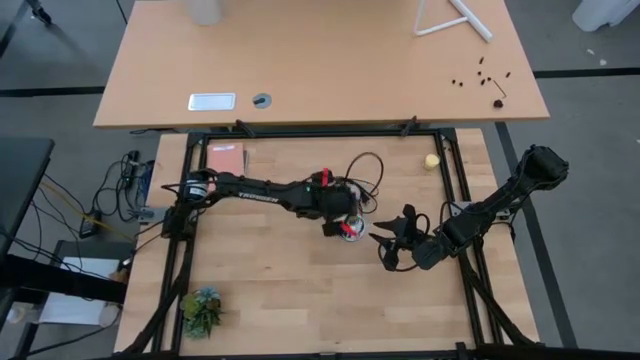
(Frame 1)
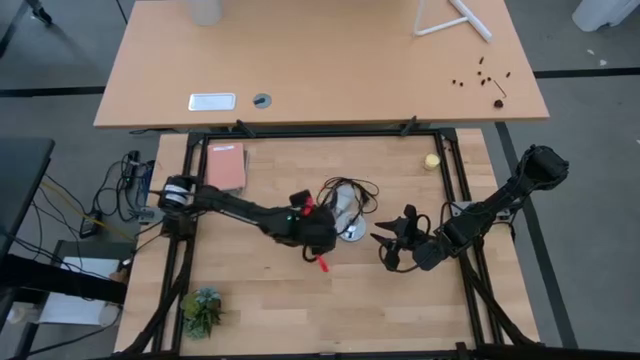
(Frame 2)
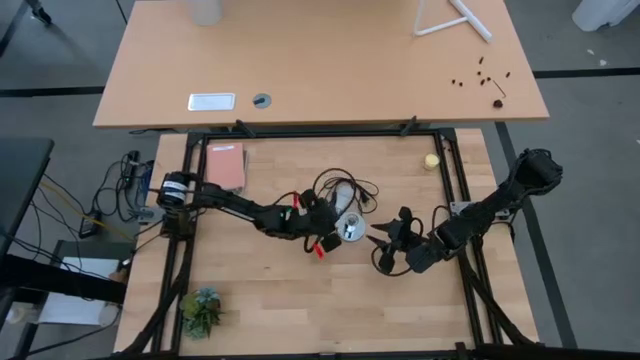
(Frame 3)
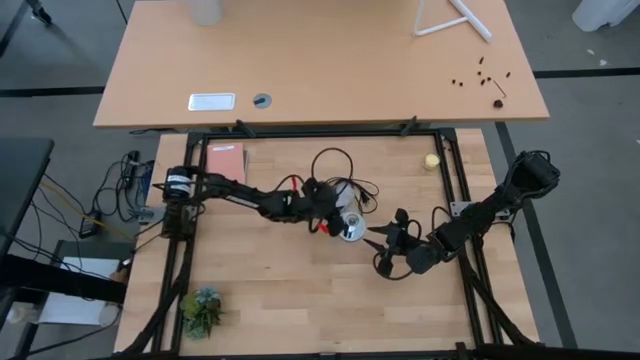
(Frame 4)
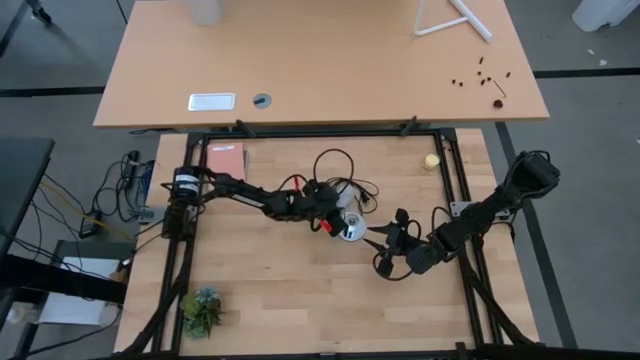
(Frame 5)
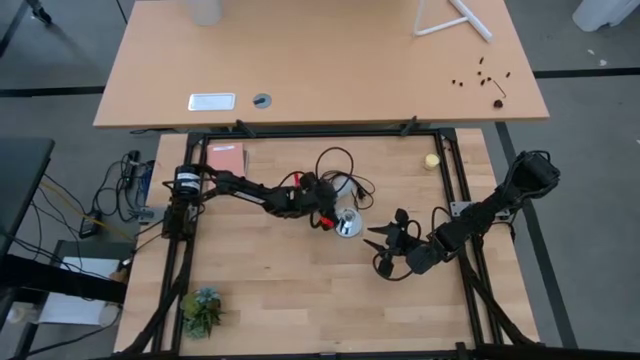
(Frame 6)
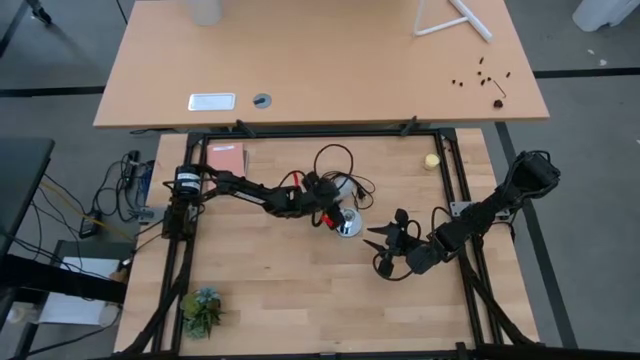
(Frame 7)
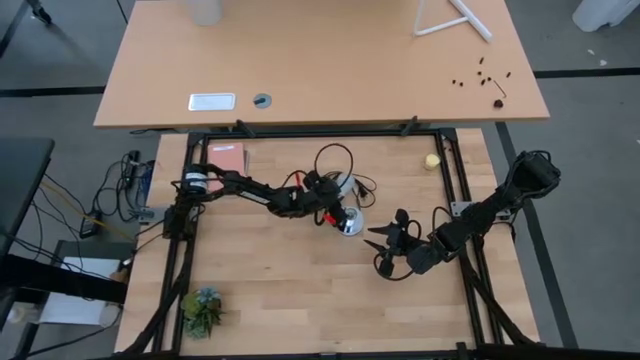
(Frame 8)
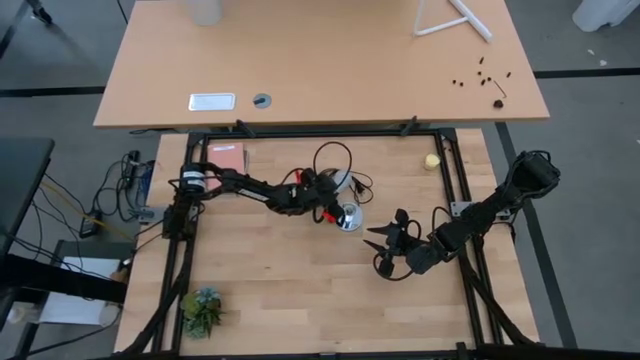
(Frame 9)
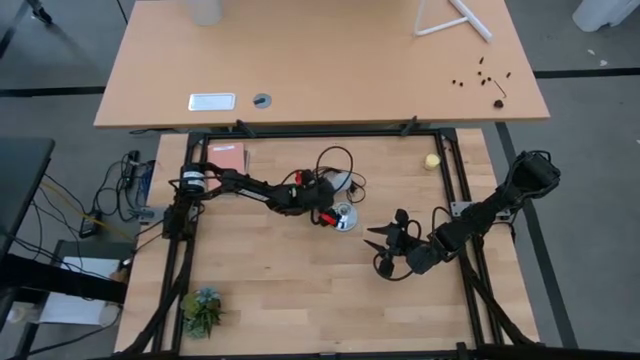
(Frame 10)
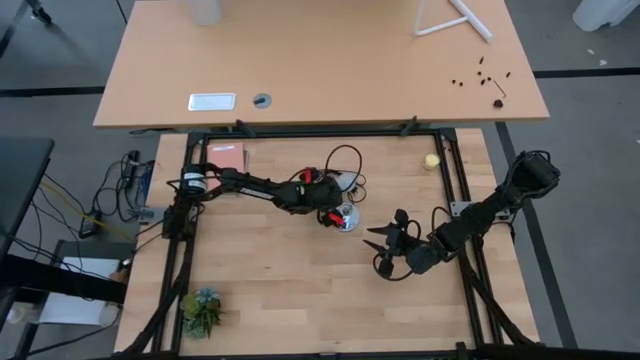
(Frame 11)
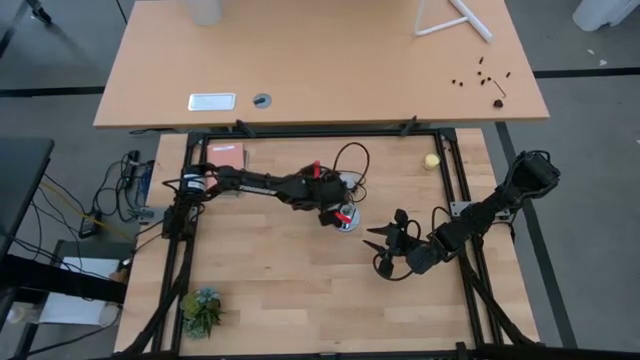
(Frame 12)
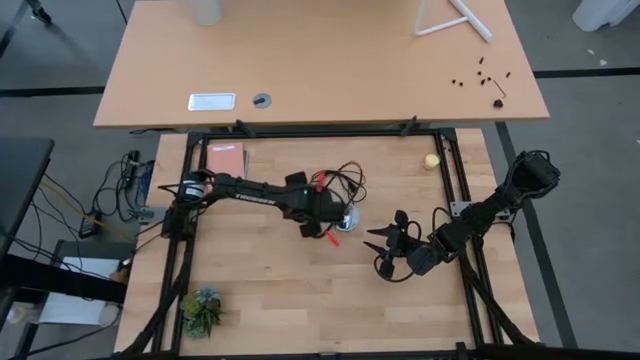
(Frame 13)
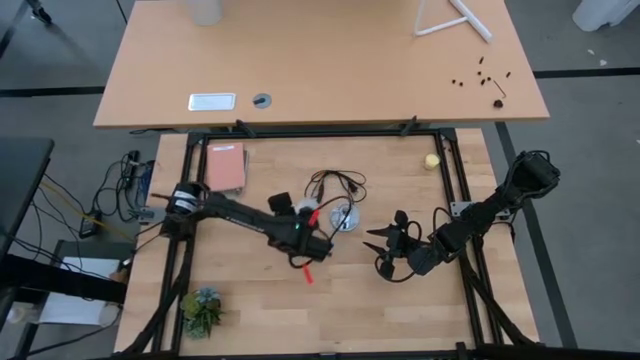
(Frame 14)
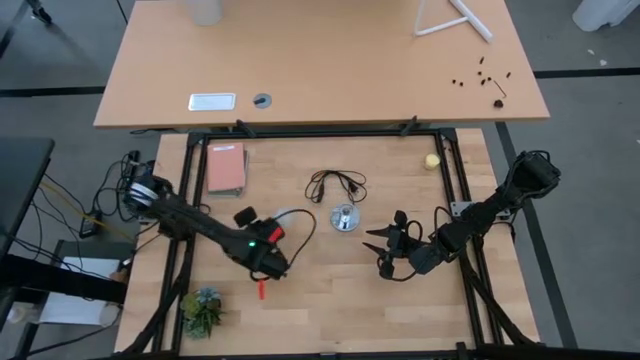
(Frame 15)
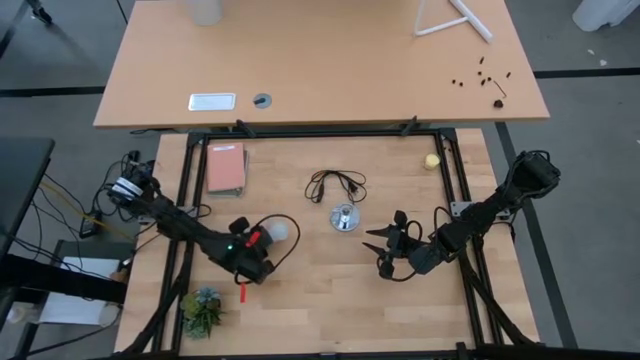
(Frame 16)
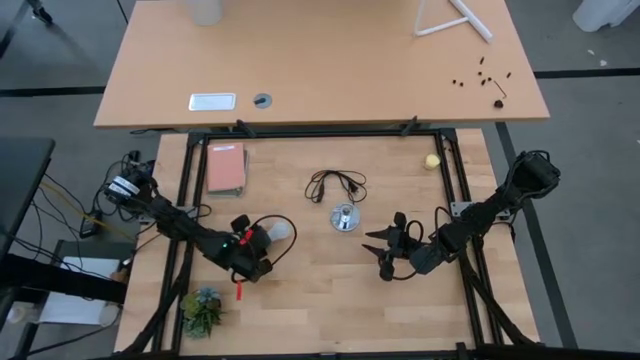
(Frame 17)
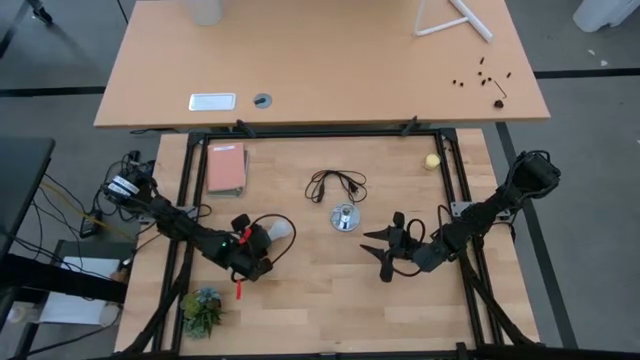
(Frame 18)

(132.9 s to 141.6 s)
Task: Screw lightbulb
Move the lightbulb to the middle left

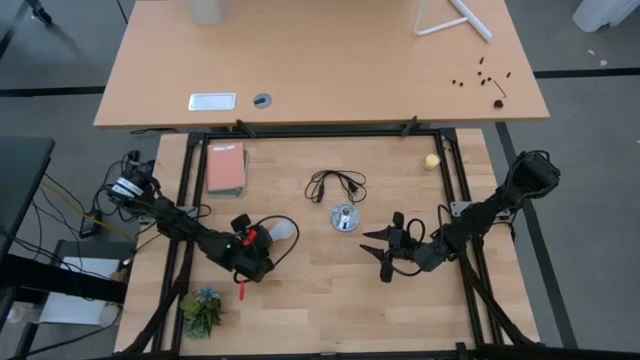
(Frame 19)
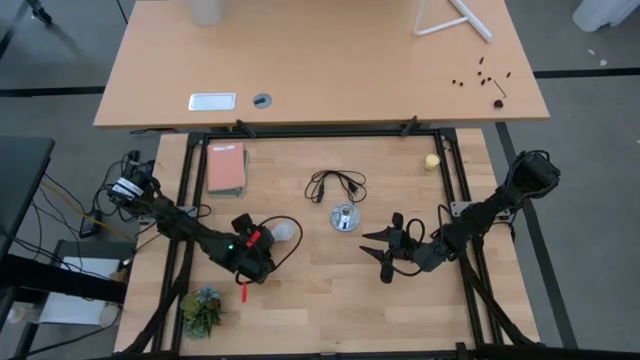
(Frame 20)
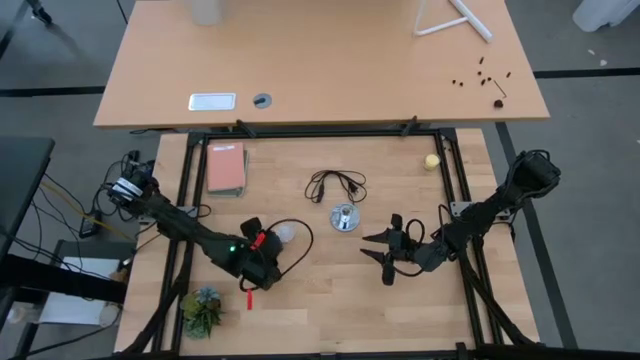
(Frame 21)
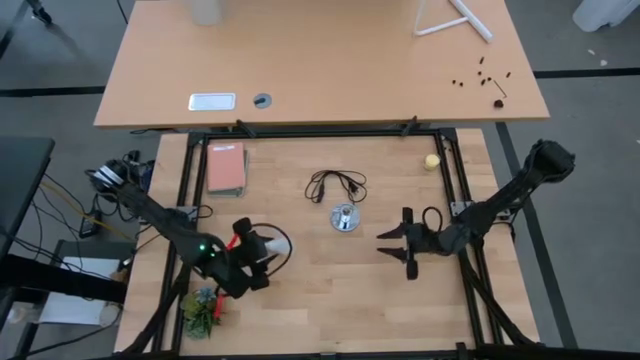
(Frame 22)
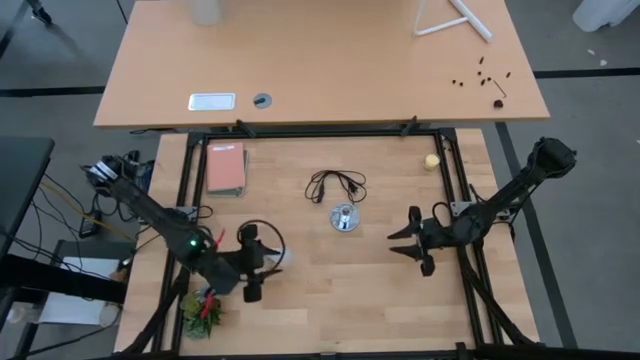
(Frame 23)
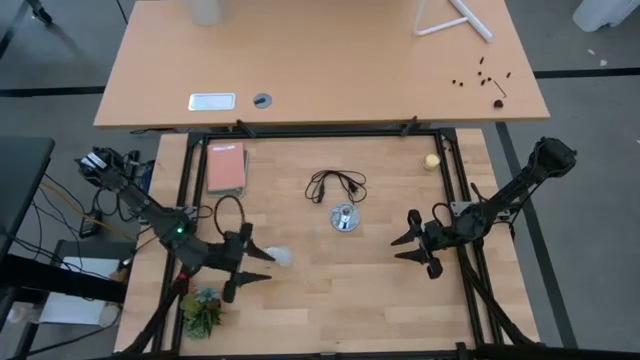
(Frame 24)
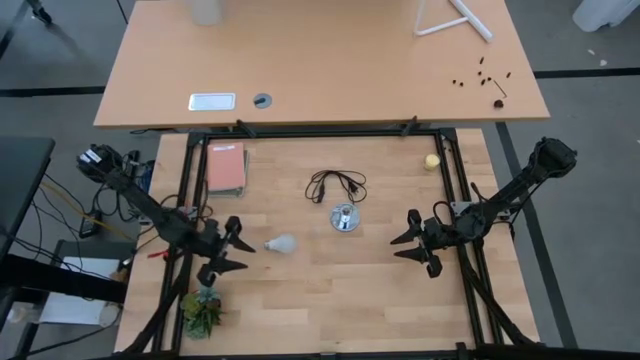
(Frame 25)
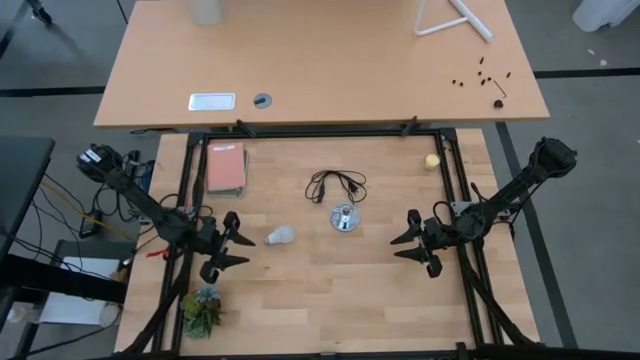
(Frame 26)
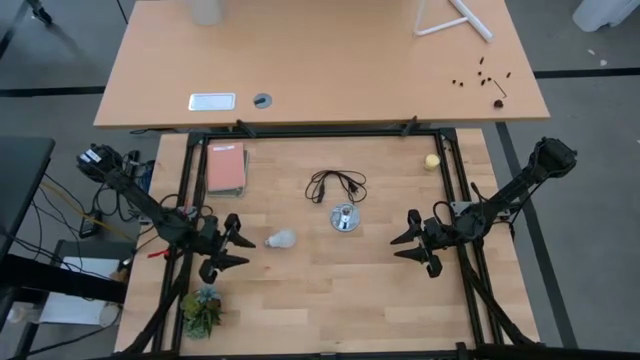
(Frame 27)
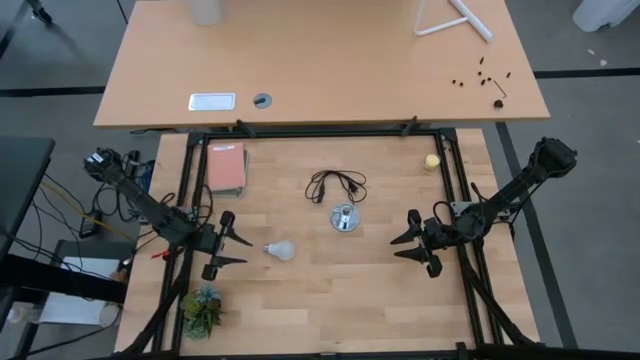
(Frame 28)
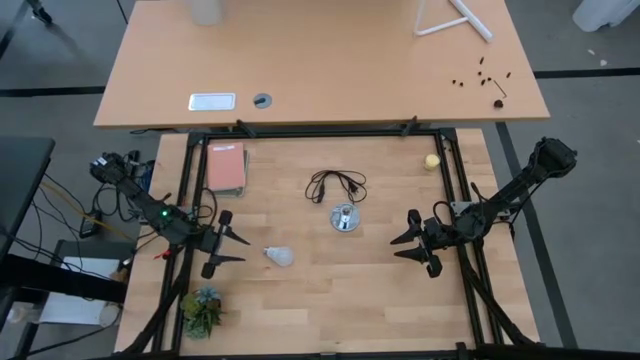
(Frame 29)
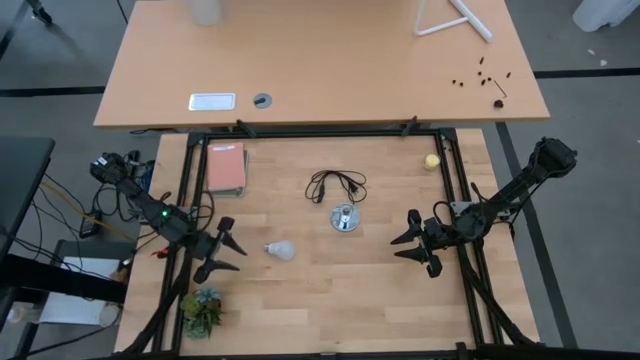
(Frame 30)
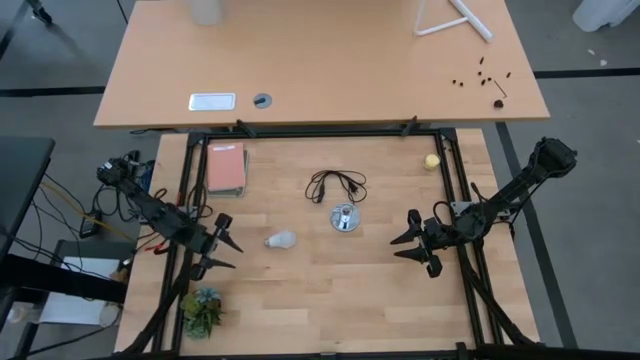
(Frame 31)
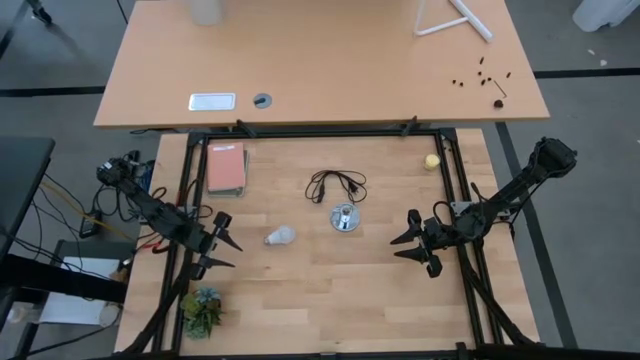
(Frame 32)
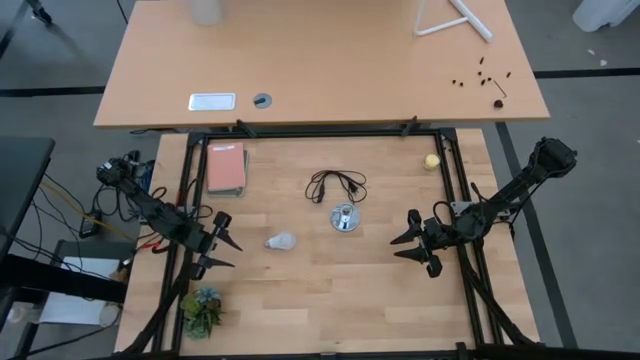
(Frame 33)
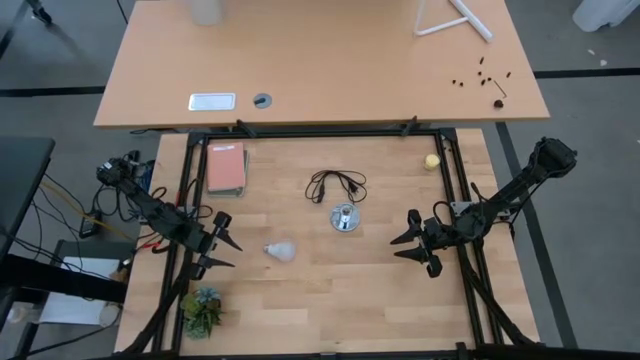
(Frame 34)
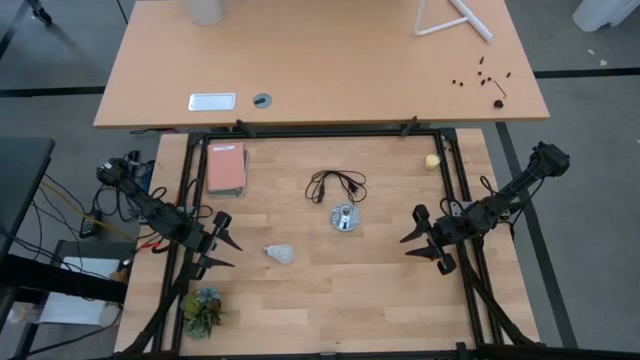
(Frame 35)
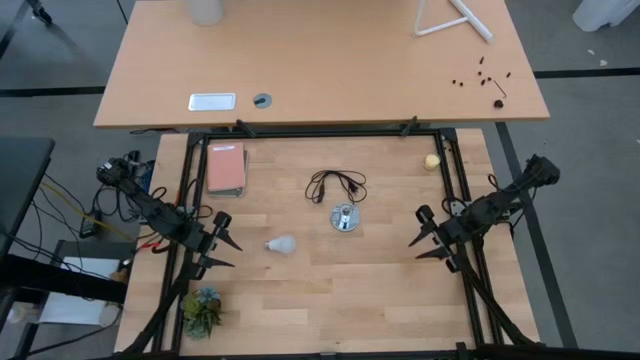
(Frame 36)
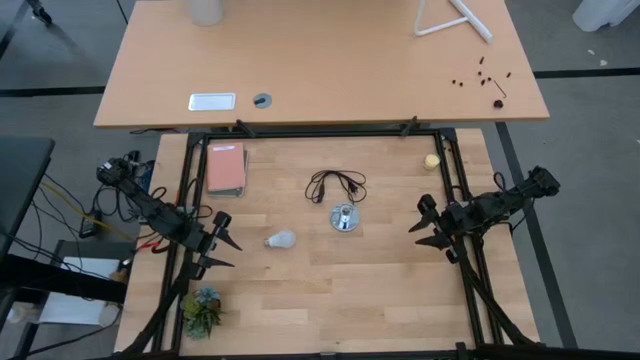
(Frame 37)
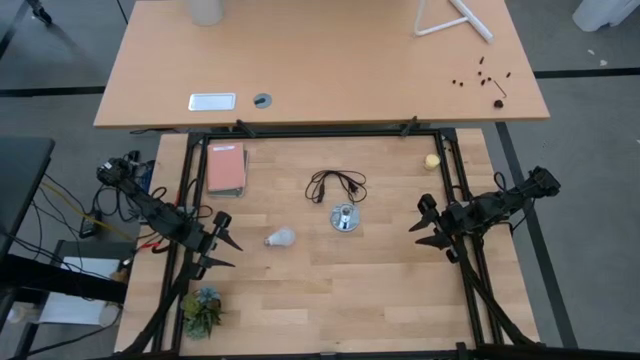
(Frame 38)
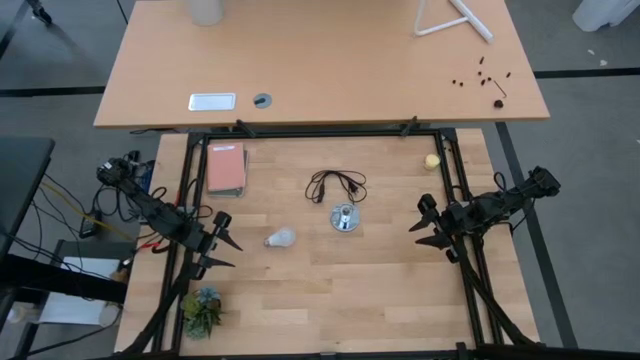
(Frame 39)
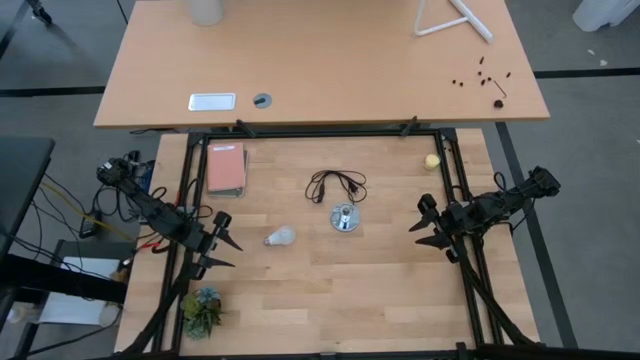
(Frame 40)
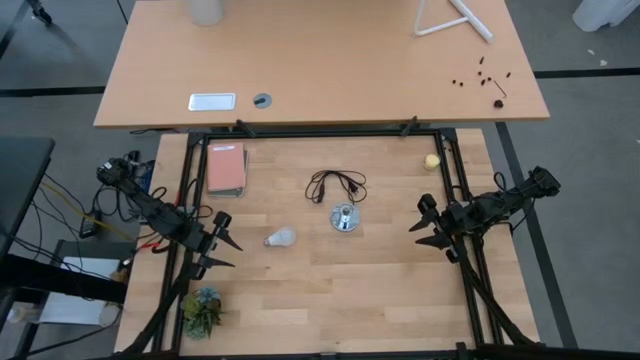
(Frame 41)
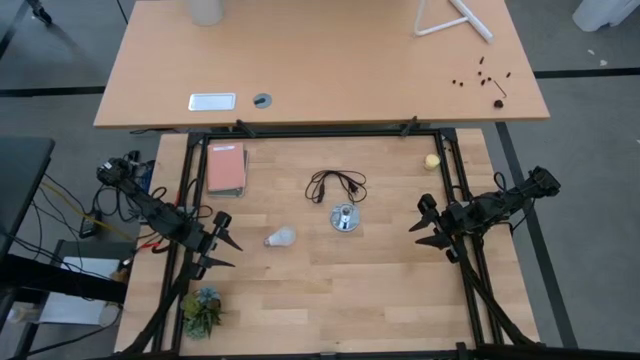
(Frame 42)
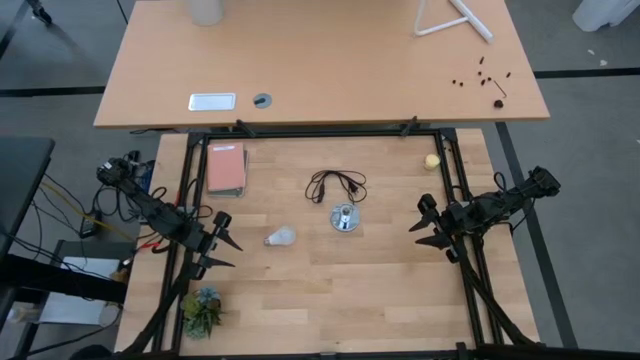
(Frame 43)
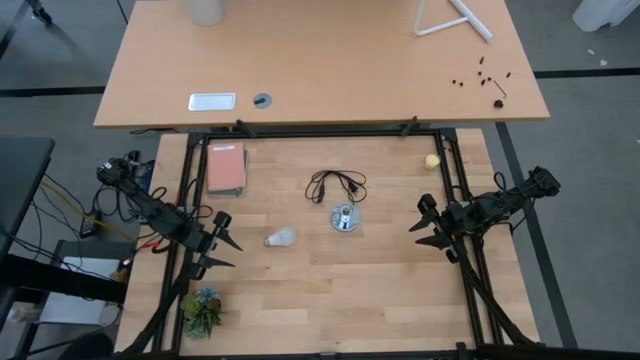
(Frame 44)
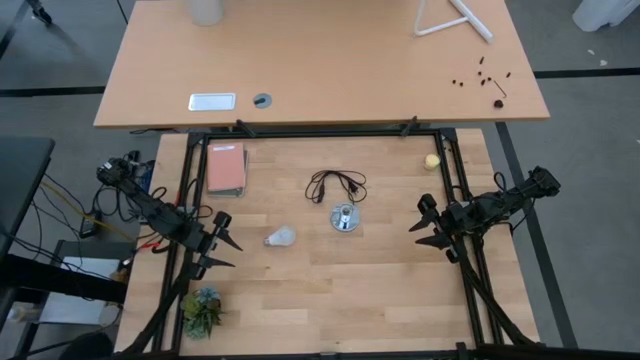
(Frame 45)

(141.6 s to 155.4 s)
Return to Home Position
